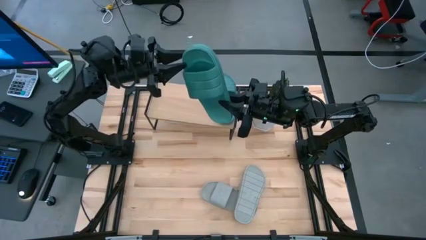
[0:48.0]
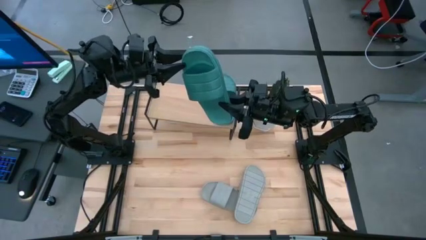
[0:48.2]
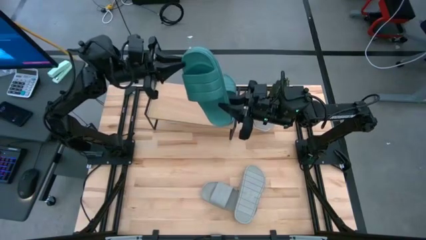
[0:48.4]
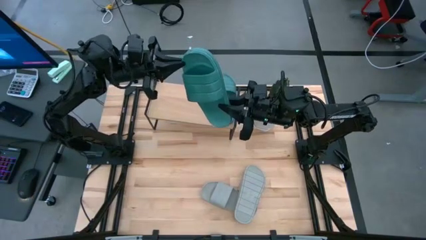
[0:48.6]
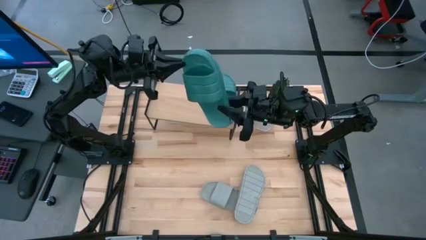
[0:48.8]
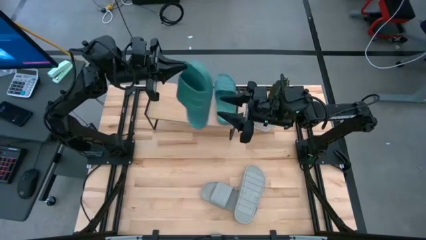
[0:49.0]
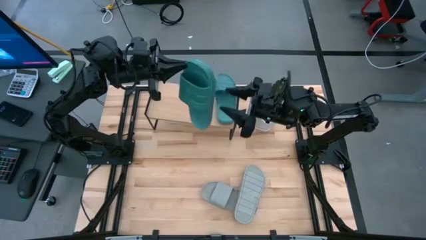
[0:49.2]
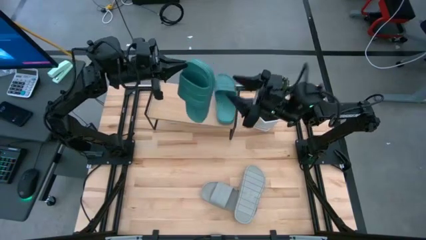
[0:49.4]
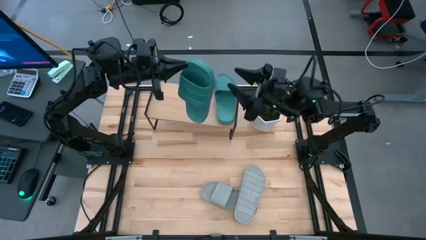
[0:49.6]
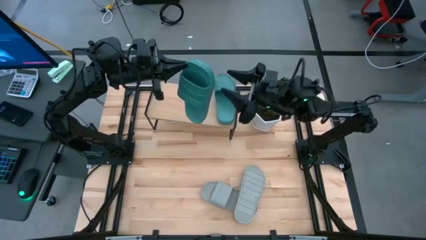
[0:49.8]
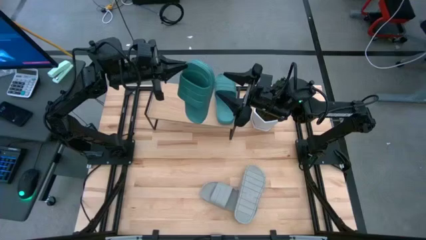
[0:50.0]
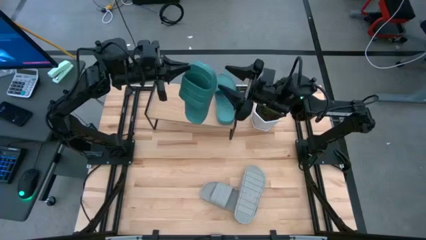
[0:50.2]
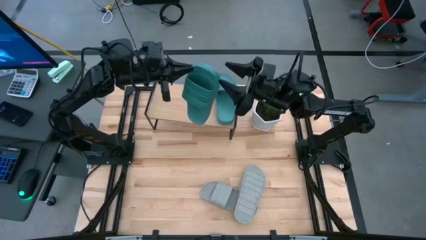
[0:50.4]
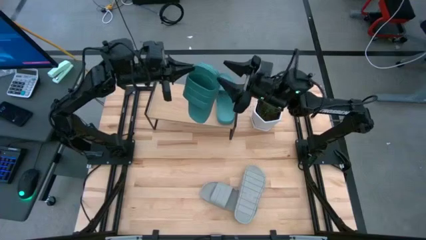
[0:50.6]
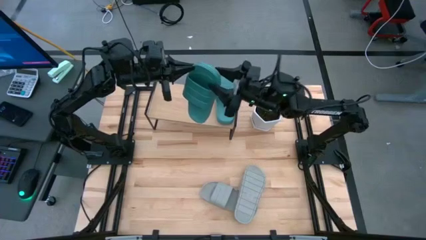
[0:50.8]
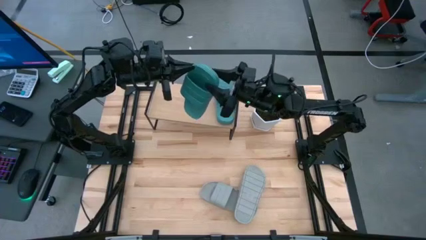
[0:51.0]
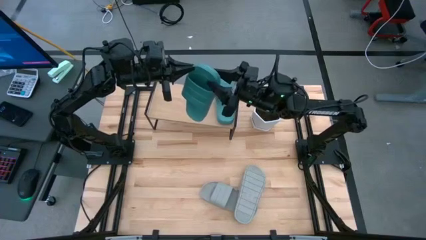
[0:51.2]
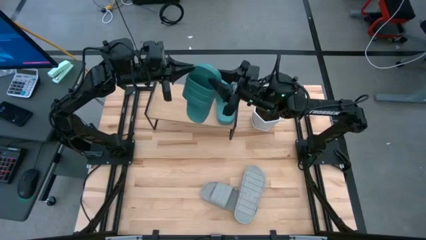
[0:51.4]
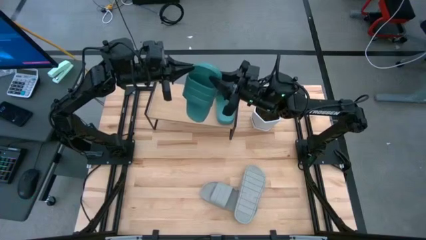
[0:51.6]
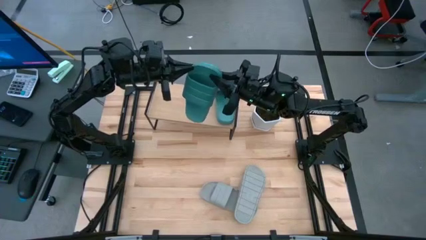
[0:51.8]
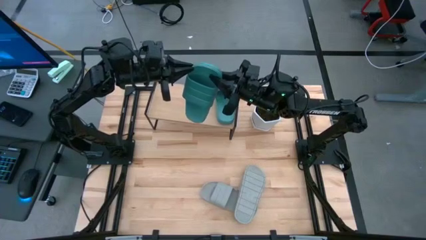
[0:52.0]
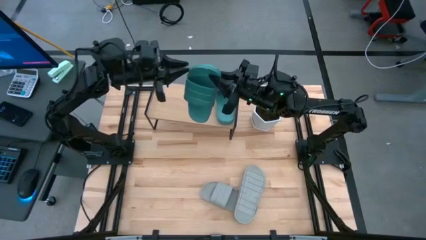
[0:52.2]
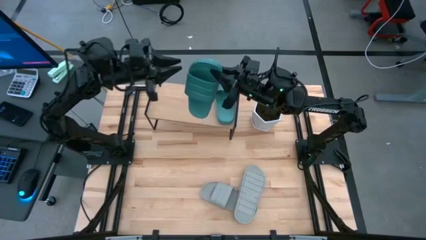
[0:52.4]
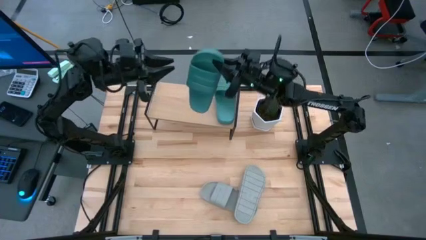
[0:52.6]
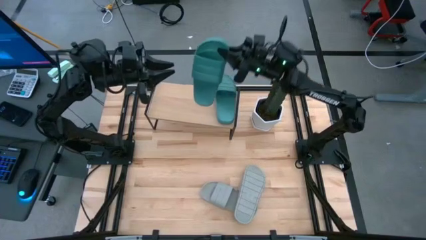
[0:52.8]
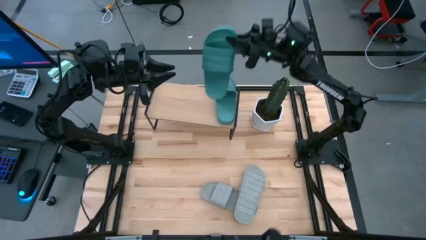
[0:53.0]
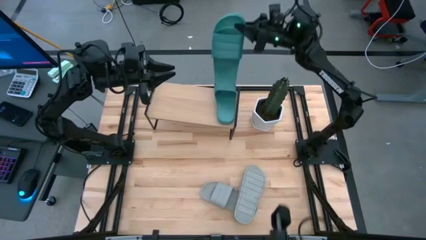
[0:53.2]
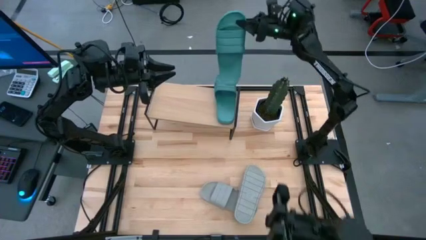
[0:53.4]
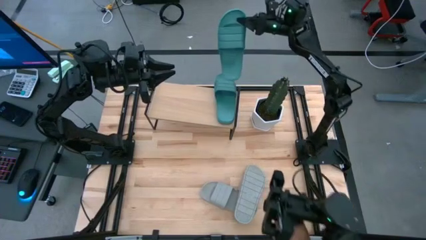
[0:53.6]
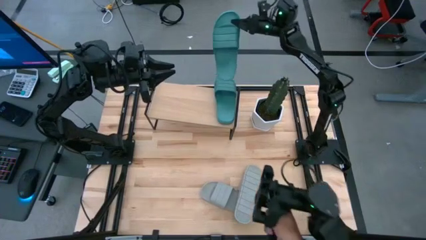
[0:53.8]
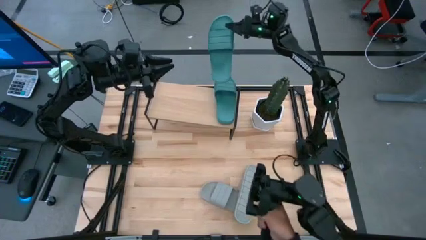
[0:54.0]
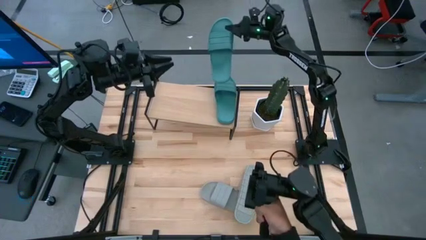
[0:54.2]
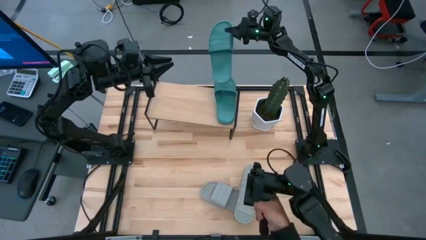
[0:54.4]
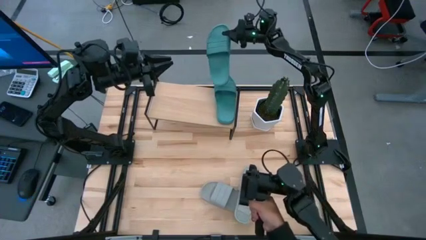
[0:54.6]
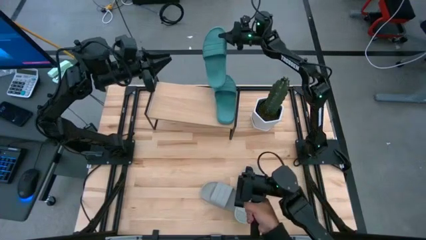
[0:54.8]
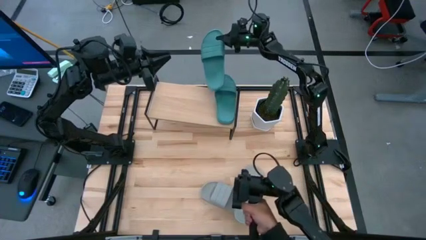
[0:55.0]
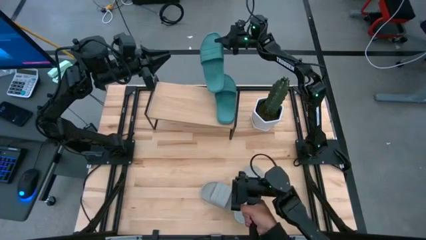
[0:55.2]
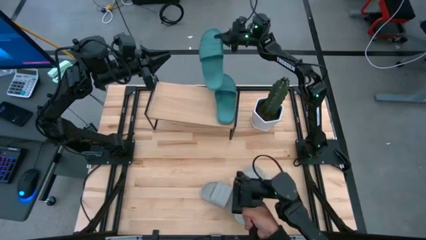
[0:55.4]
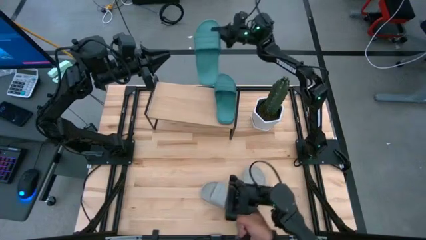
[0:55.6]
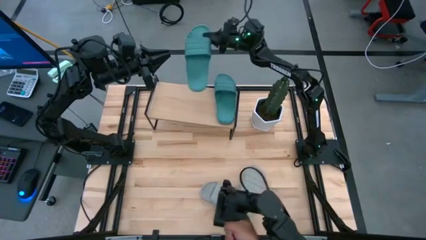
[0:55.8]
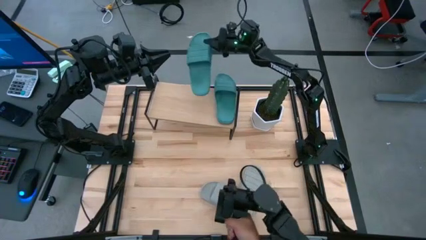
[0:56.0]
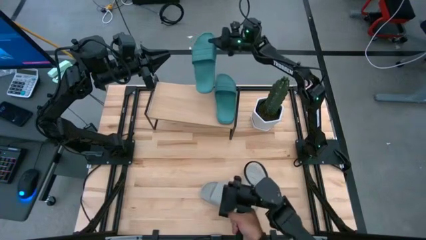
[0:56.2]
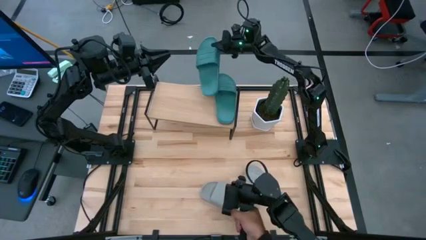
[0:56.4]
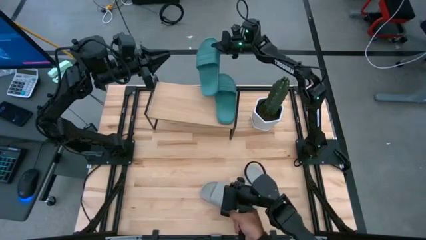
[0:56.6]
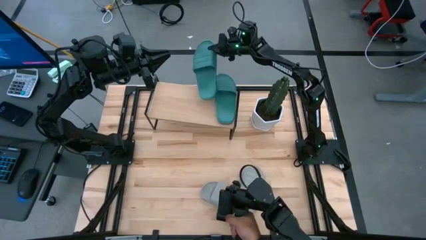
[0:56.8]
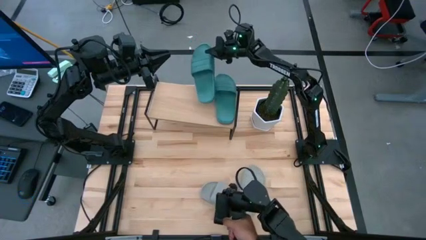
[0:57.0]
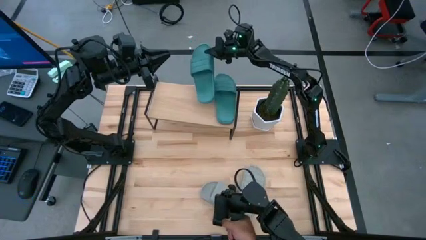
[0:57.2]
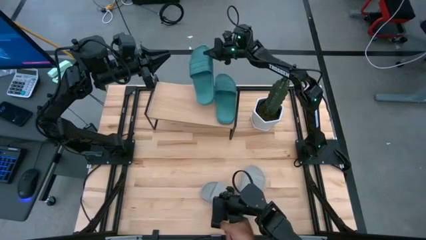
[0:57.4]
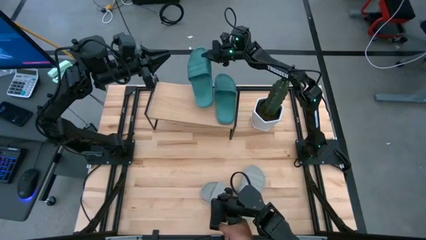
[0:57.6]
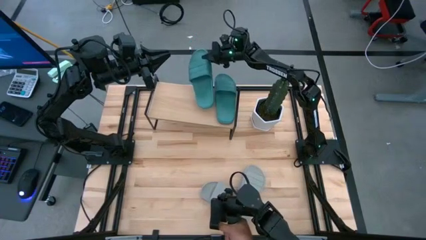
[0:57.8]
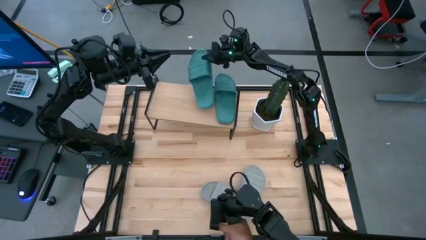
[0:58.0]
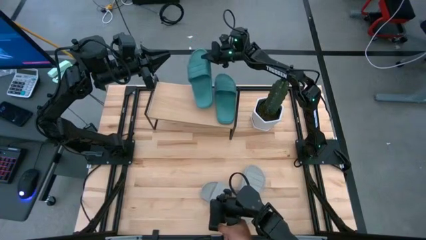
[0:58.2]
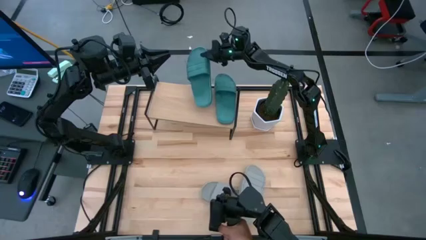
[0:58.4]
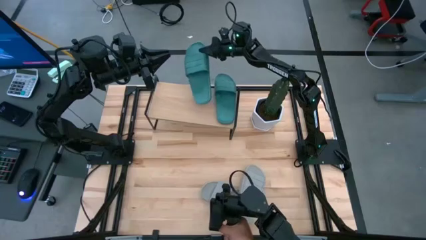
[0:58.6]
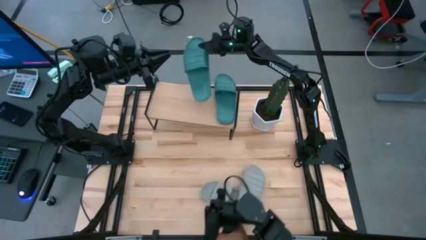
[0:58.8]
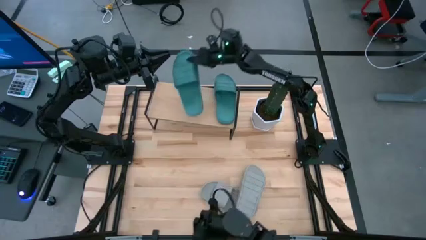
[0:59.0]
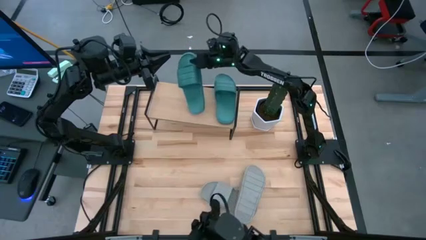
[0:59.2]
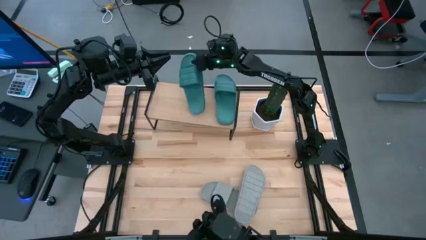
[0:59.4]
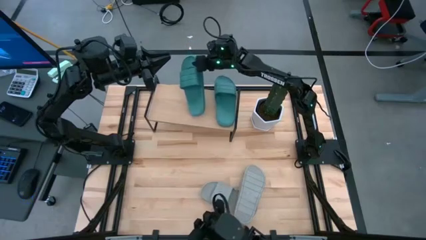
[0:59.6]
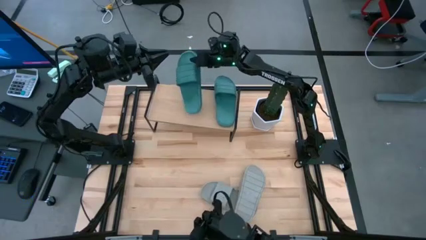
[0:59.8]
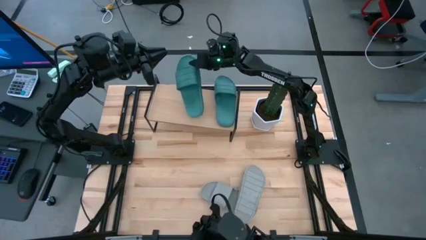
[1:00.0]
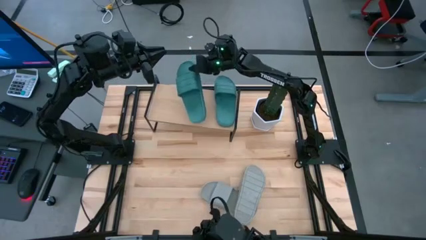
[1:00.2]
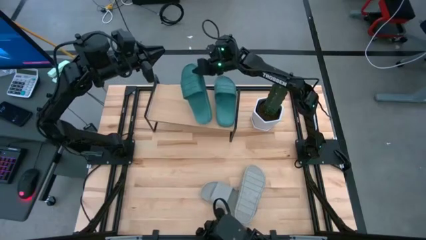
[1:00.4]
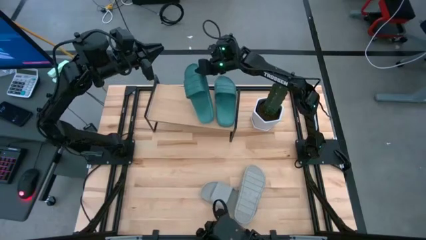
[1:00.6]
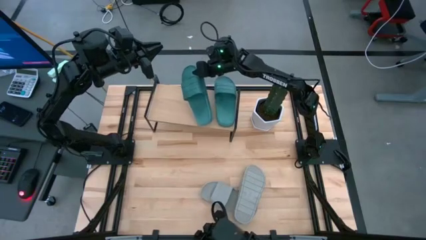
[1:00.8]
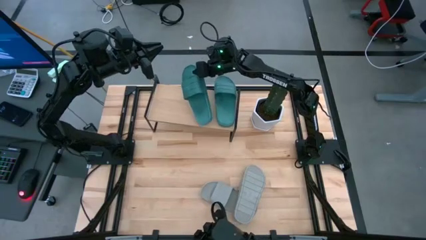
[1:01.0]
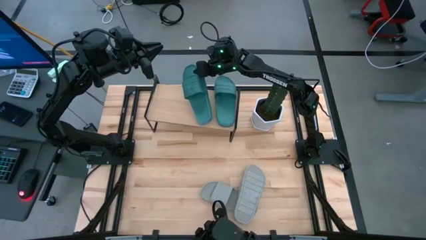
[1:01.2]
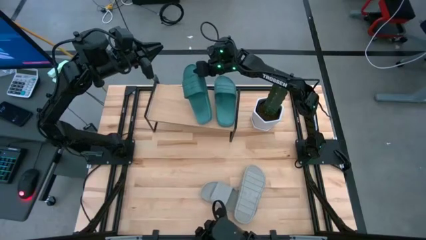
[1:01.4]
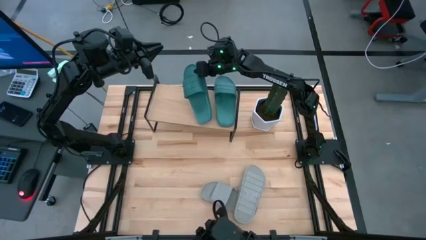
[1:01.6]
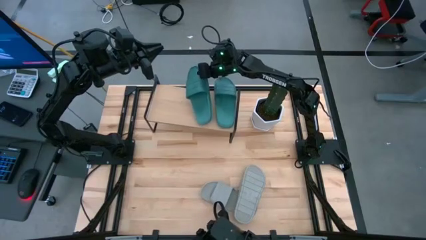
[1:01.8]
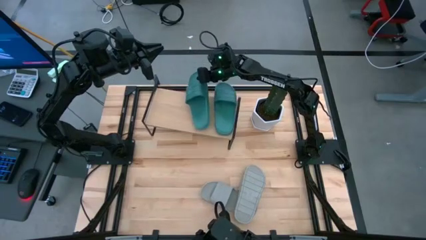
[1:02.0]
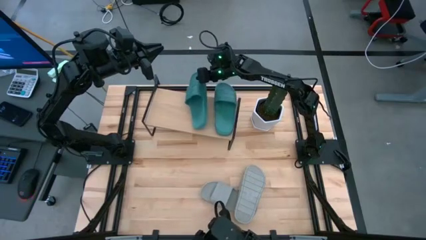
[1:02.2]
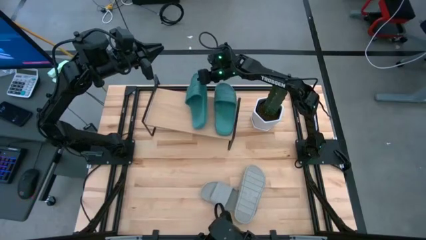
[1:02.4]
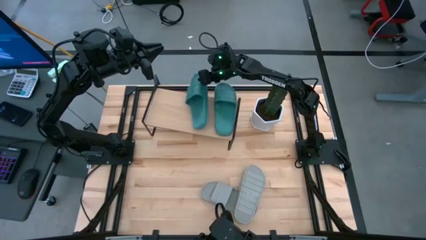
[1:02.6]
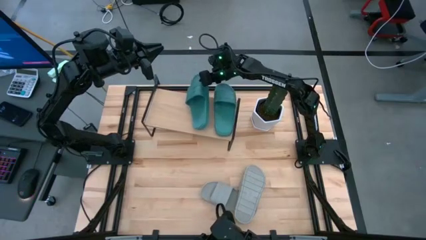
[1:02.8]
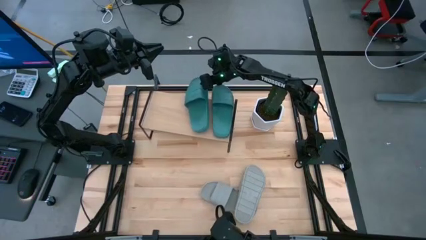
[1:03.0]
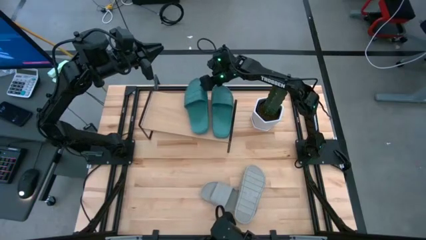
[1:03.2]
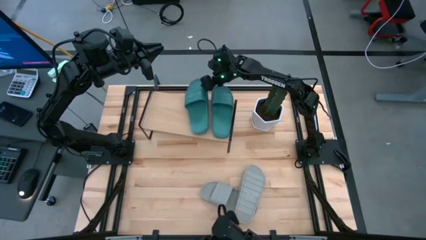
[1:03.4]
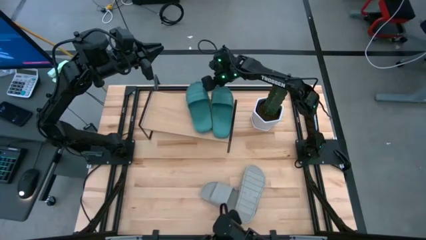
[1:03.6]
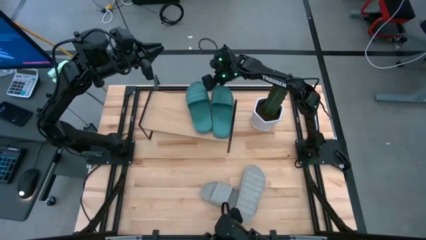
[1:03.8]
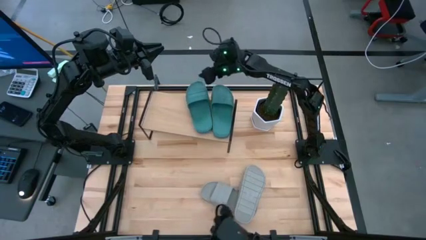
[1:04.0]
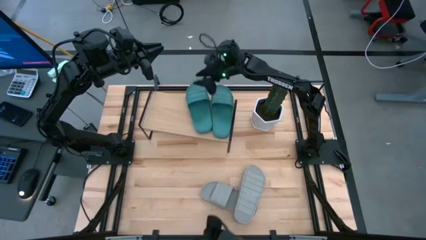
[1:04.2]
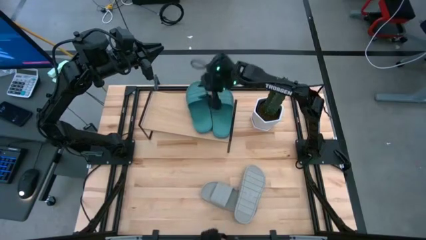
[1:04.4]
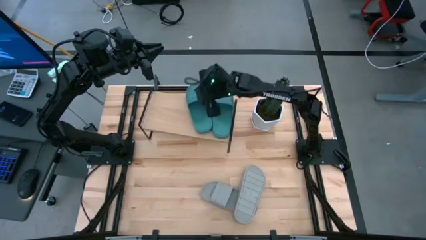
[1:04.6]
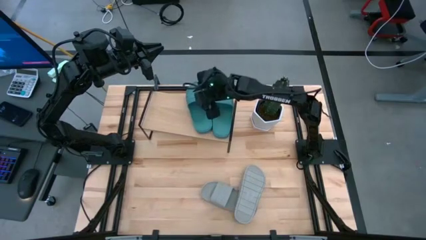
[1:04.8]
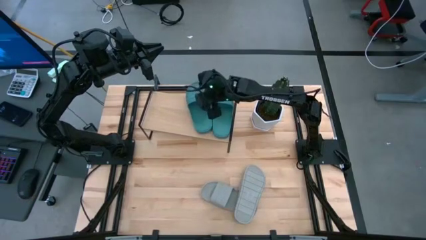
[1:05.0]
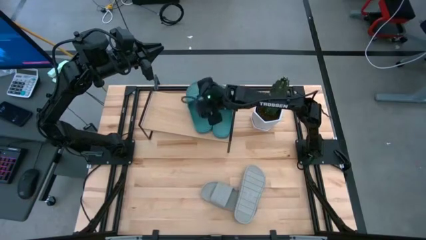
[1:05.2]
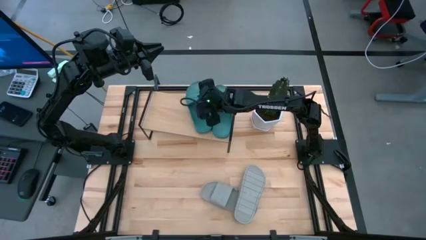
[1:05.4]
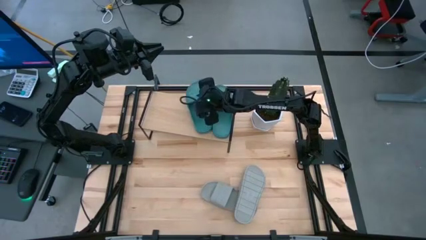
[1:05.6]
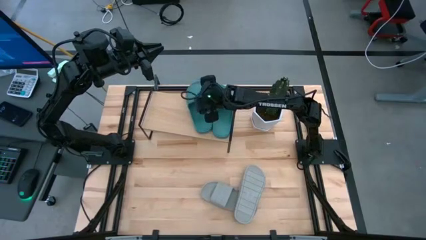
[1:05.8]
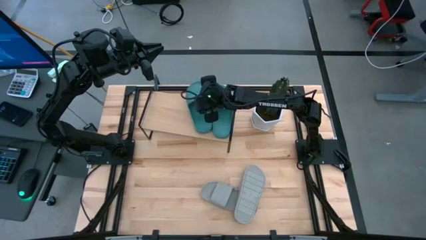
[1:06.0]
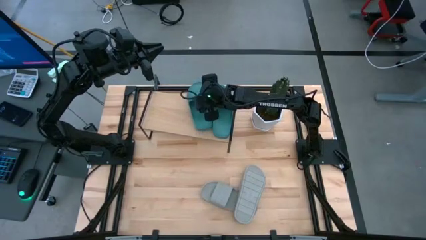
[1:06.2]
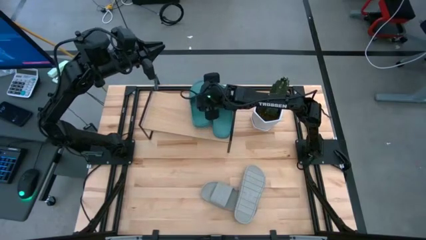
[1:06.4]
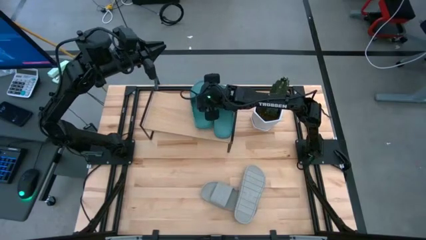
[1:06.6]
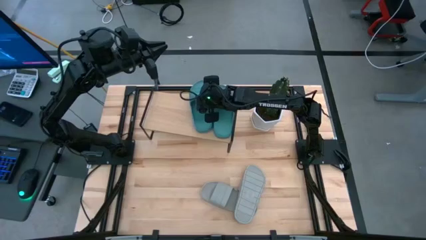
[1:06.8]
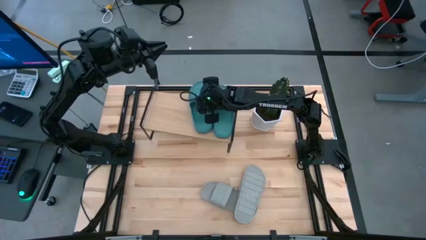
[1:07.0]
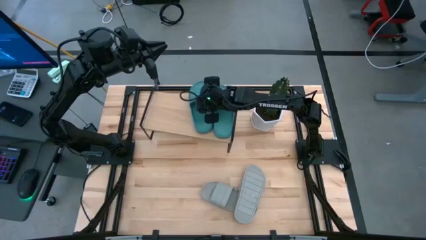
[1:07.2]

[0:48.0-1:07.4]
Task: Pick and place slides into the shelf
Put the green slide on the shelf
